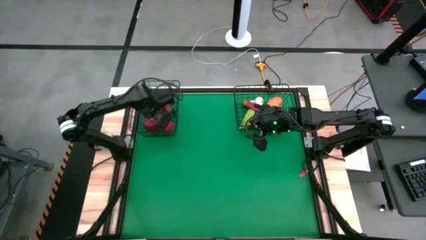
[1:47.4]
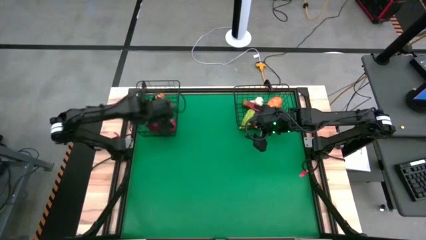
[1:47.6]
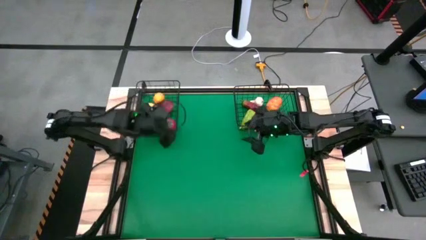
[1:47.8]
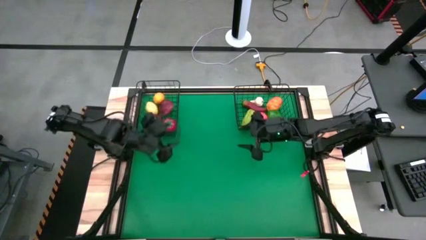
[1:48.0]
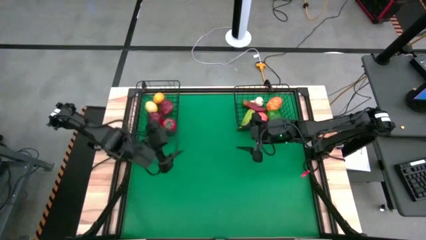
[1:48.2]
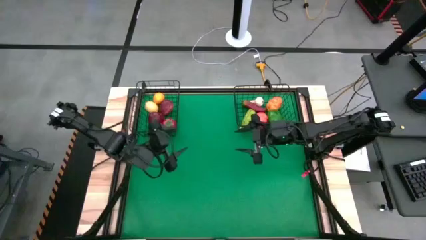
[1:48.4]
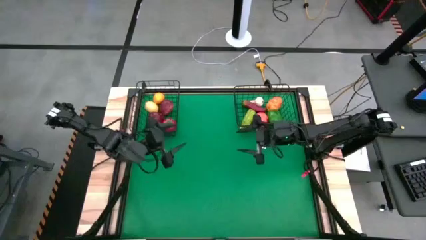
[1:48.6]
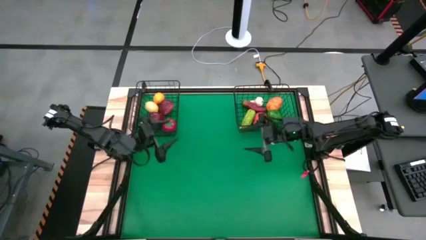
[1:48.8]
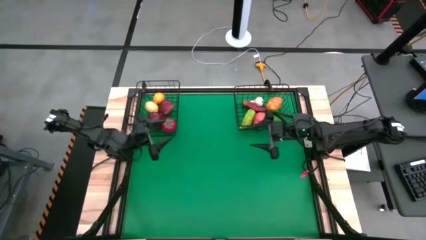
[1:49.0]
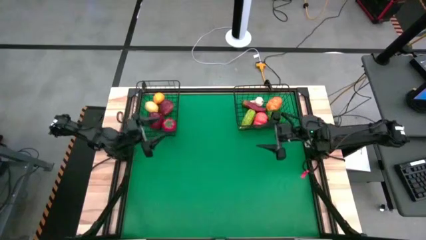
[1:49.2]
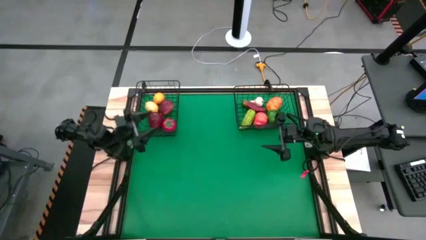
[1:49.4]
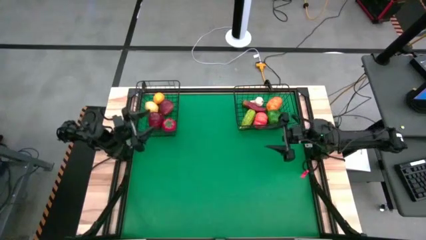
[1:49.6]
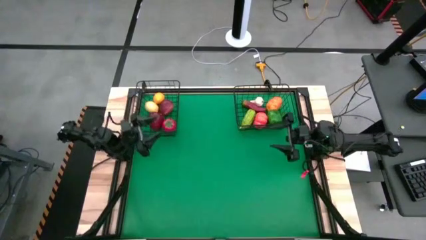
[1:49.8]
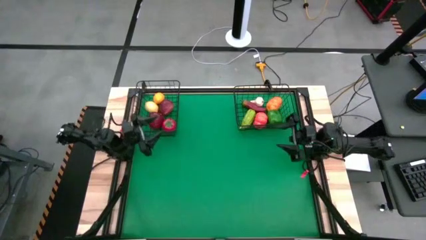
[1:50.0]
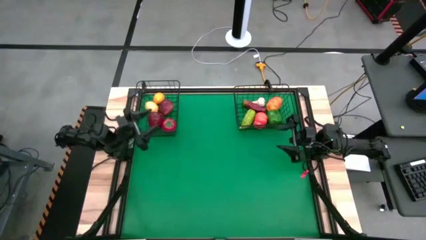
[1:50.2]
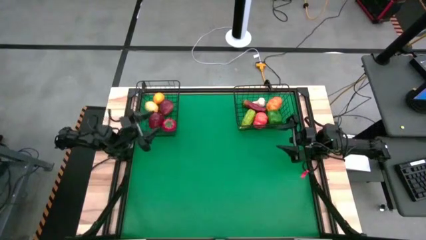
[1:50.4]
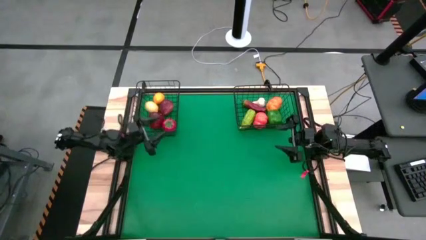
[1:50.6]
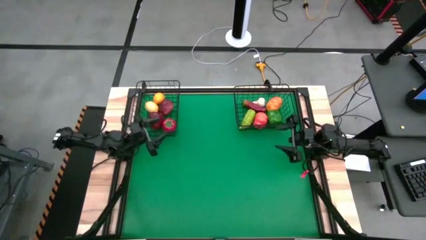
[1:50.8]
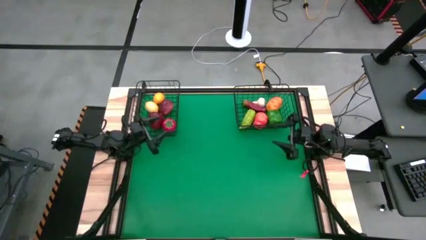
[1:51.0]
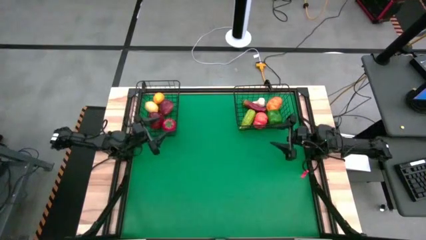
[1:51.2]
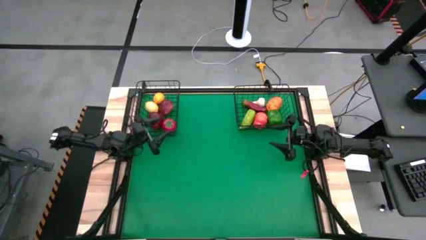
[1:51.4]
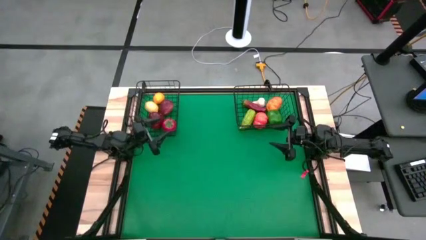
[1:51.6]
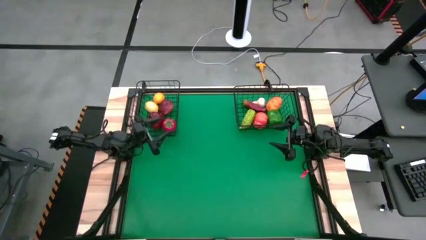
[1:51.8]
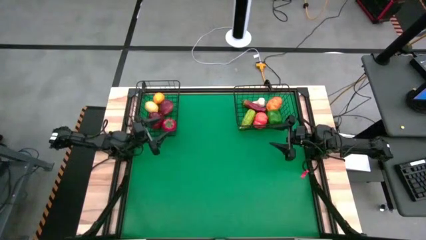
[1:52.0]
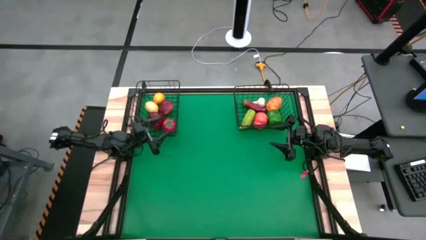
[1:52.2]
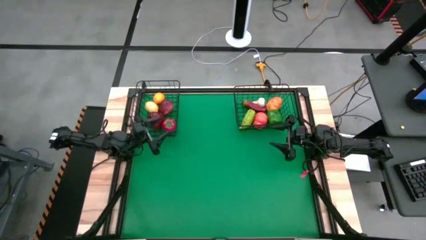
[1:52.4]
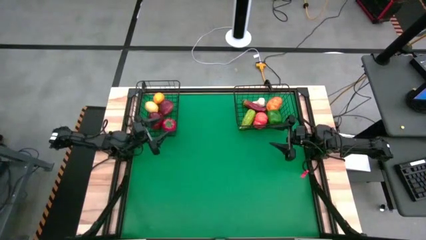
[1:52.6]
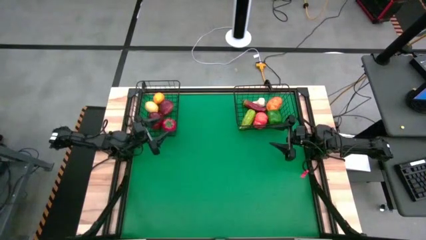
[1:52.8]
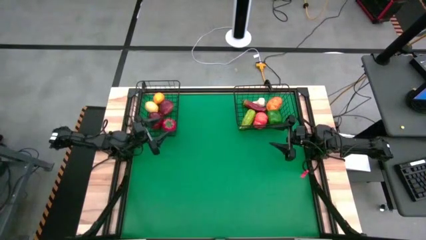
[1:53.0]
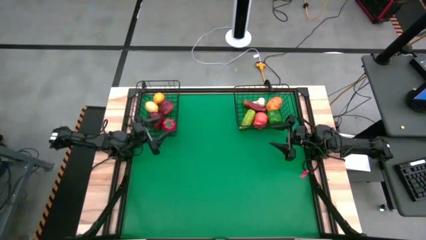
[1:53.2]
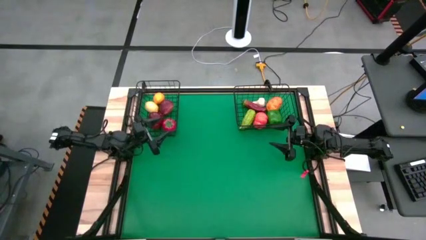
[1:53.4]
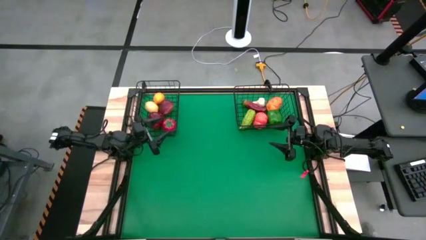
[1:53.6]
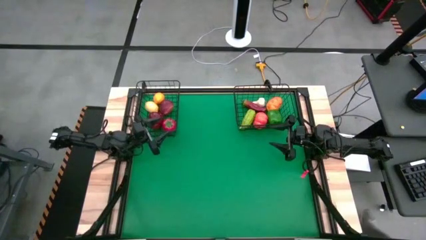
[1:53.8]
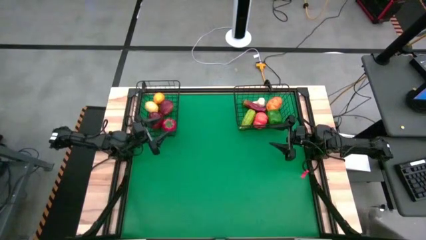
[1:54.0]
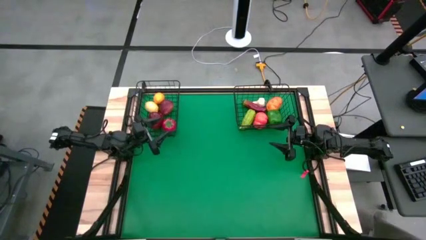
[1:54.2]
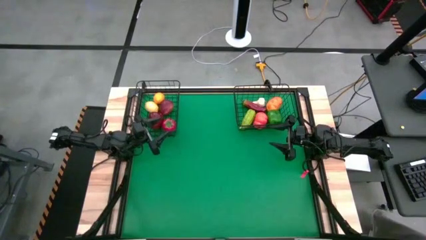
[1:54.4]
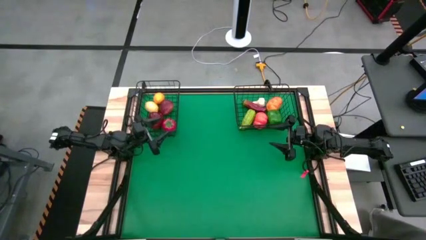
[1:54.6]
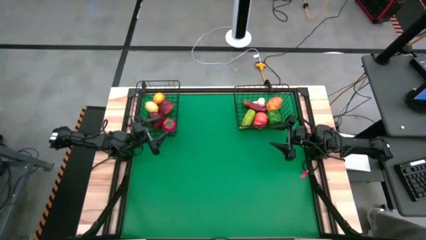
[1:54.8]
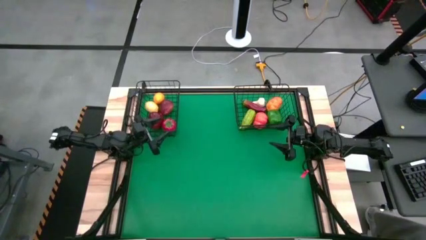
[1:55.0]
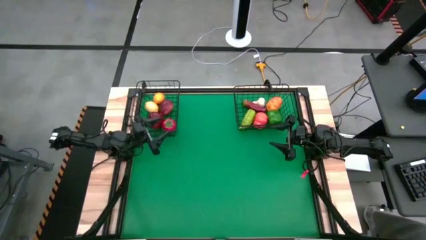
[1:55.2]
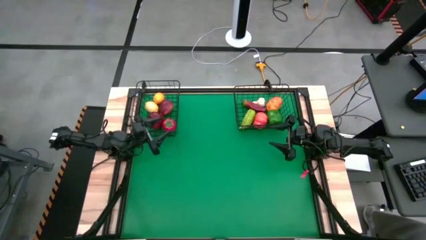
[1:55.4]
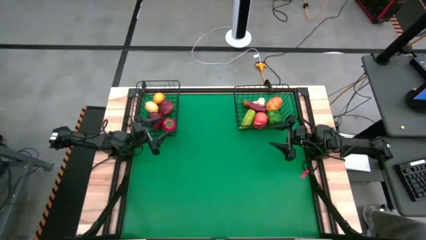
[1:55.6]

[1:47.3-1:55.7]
Task: Sort produce into baskets
Return to Home Position

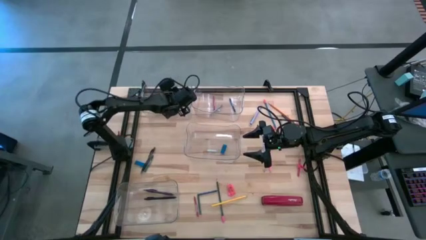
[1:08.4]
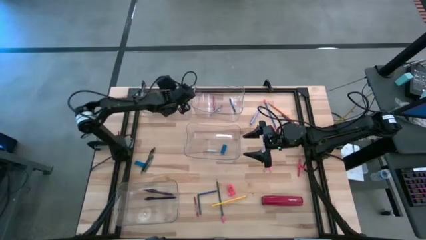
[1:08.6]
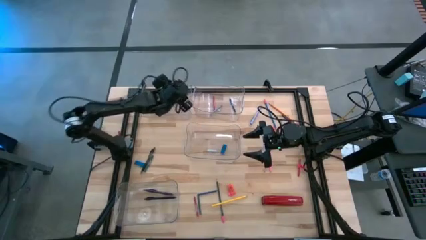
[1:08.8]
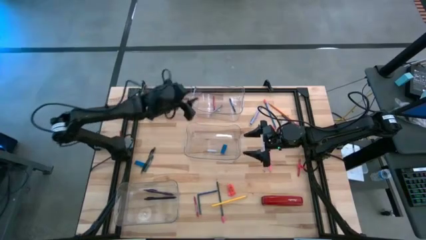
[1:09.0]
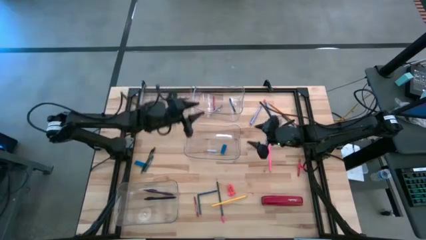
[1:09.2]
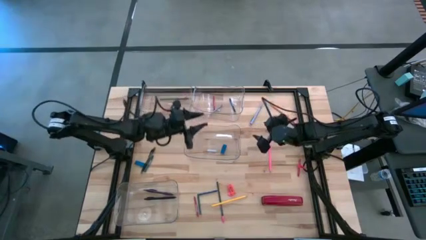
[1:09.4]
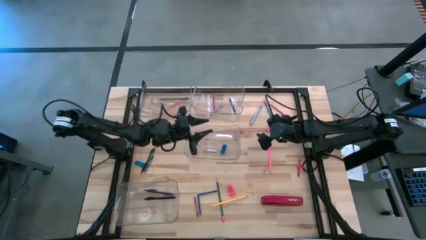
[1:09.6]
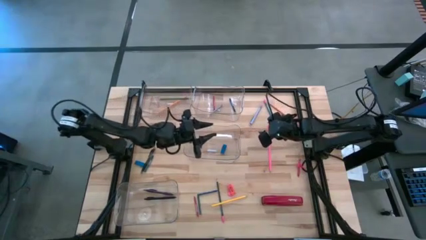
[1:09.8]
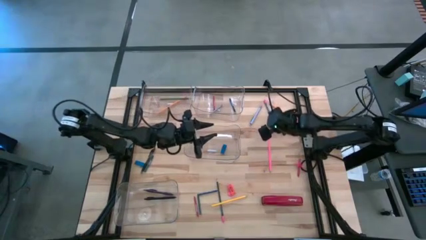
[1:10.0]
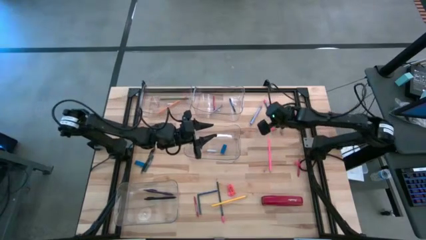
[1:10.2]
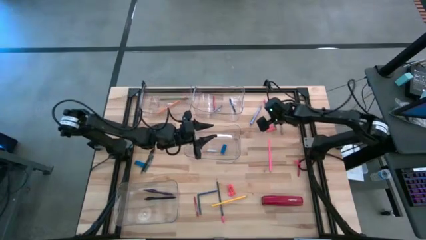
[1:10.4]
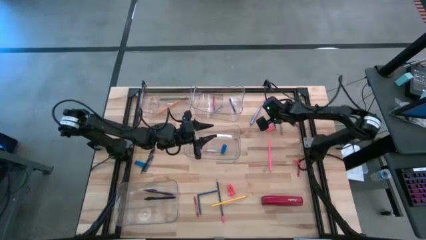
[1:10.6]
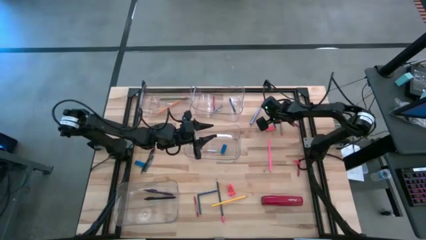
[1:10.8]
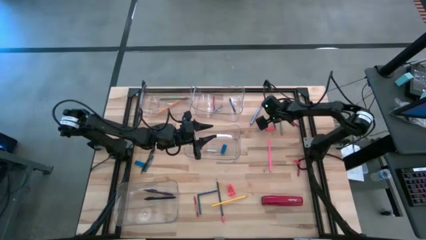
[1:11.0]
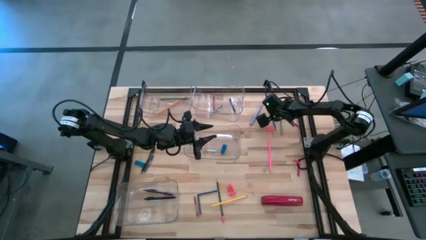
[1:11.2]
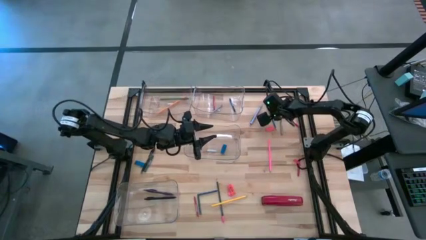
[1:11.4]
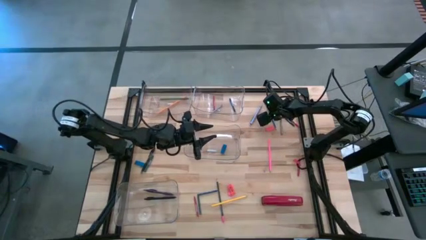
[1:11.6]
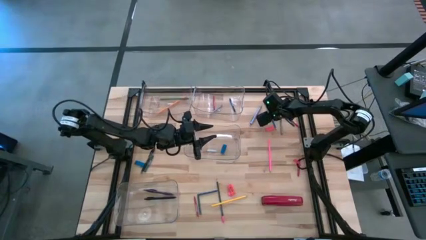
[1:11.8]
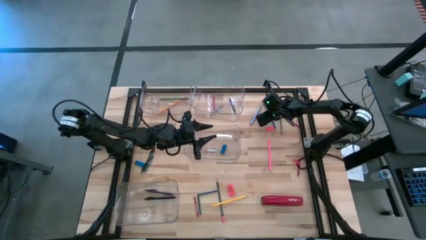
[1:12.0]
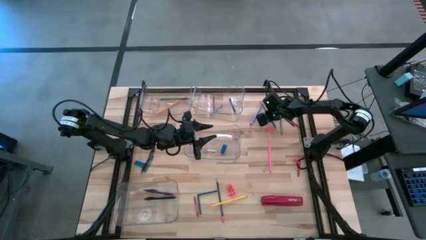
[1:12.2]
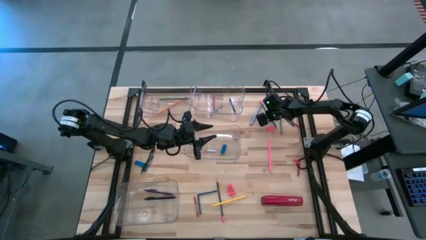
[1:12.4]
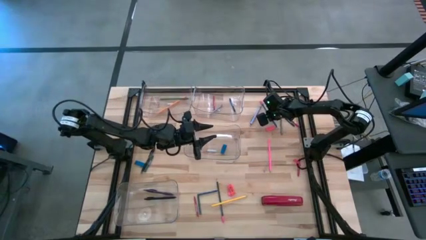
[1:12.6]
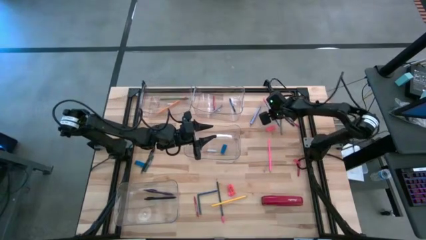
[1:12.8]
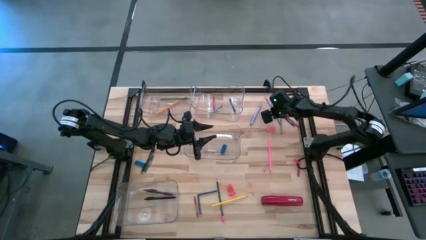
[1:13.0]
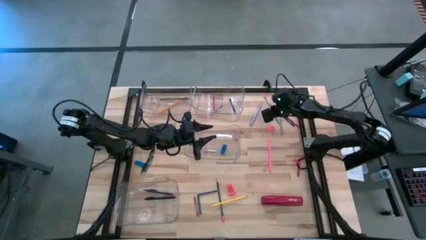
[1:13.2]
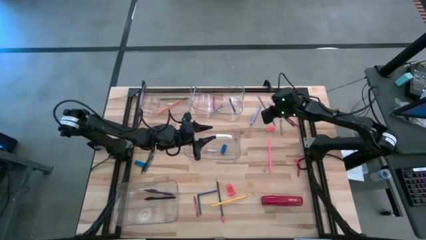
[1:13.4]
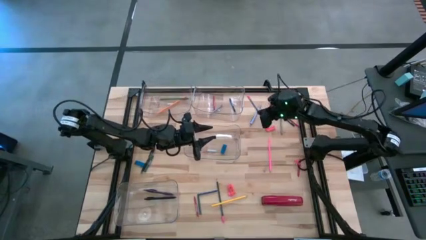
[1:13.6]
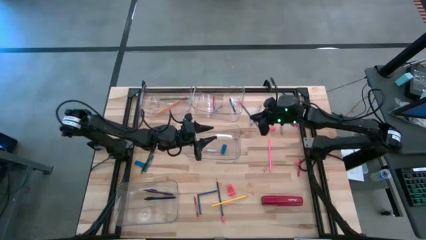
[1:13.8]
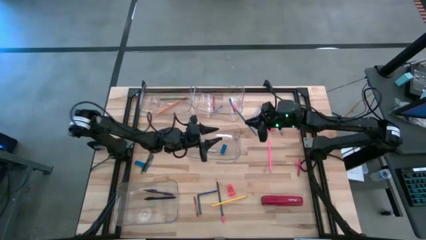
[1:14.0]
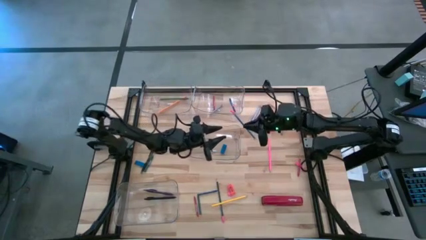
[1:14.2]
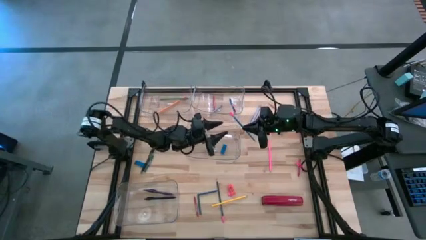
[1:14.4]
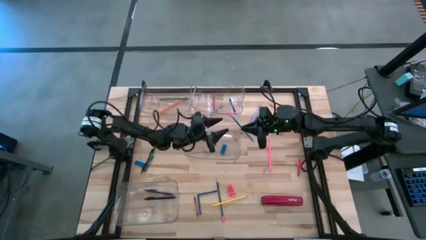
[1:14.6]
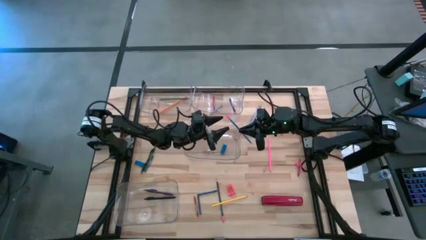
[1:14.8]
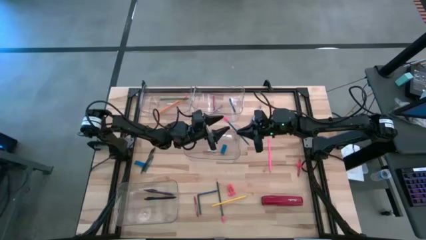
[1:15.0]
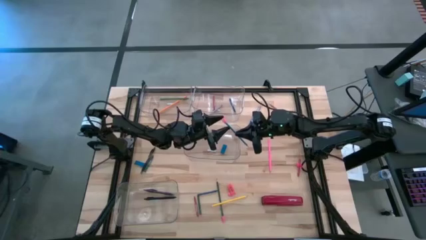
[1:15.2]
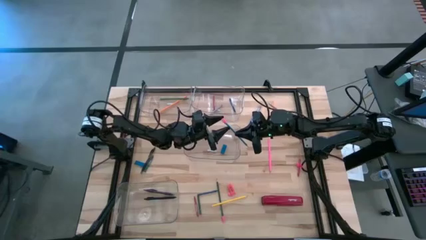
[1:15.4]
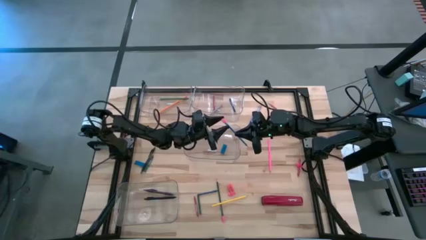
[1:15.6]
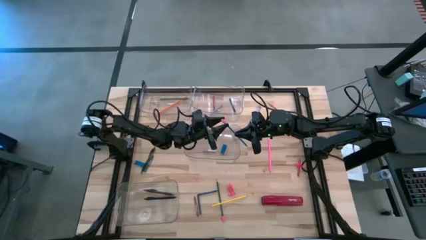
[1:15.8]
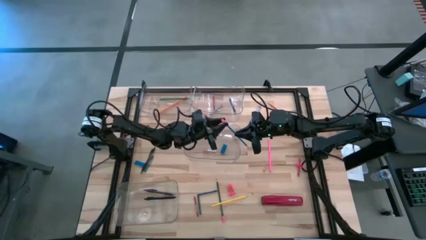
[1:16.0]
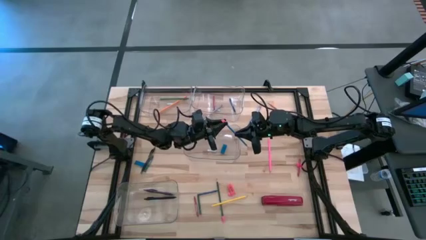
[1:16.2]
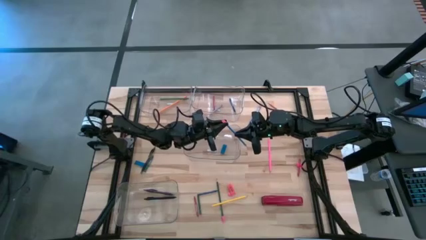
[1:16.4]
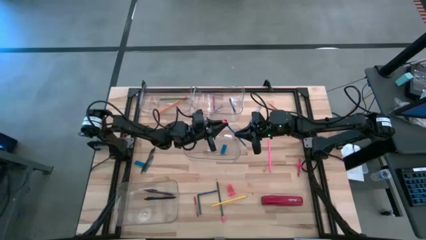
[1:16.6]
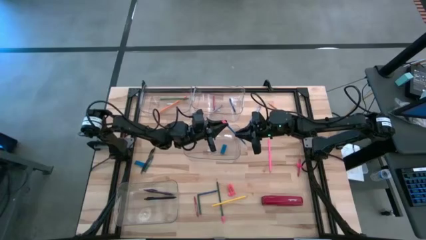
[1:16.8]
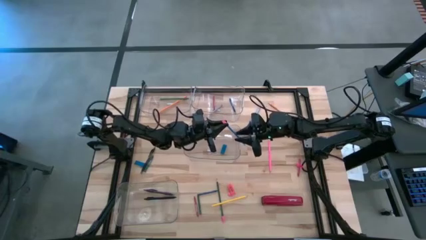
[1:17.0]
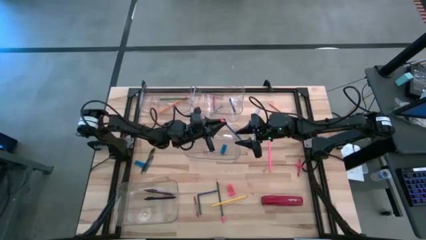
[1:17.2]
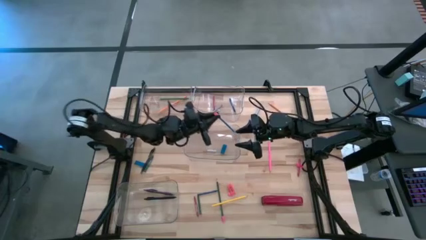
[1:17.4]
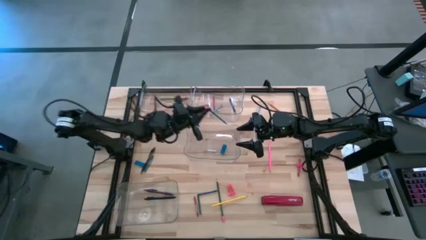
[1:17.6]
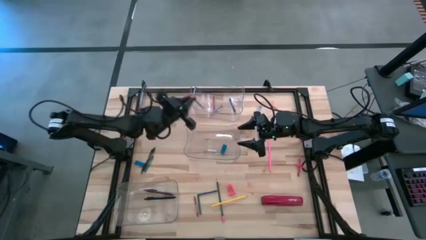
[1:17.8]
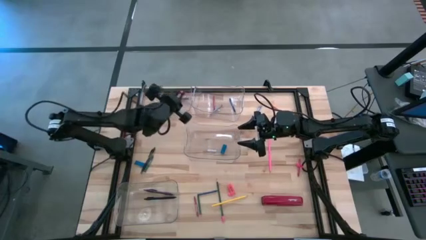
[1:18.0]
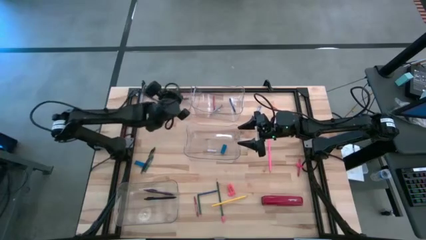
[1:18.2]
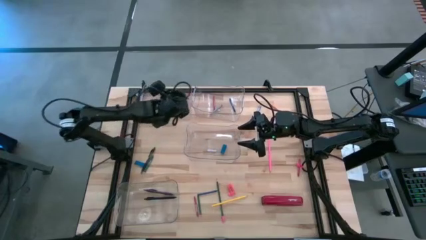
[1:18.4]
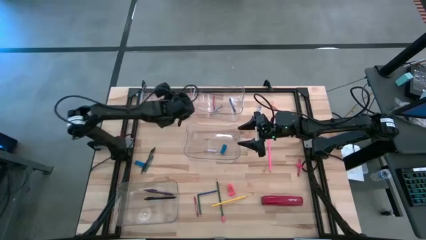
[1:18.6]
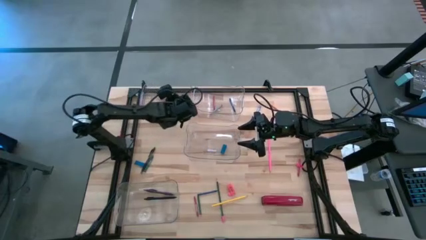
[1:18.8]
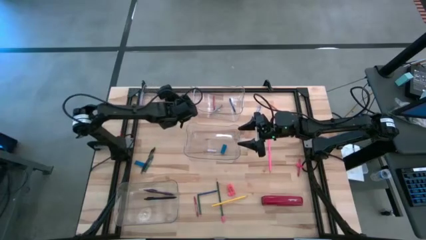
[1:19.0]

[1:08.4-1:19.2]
Task: Sort crayons/erasers/pens/pencils in bins
Put the blue pencil into the top left transparent bin
